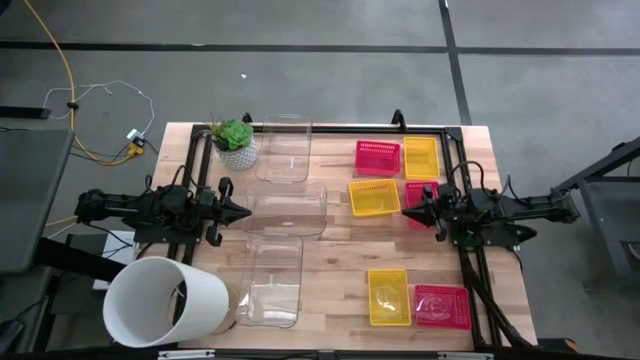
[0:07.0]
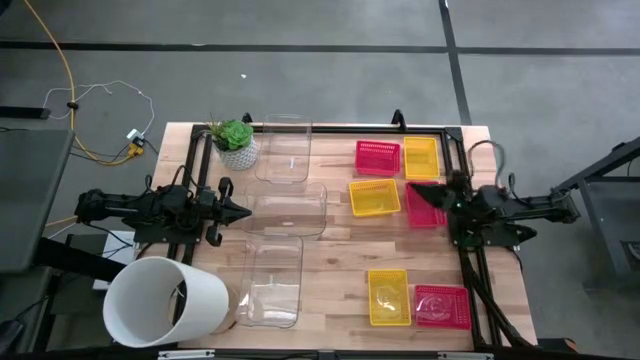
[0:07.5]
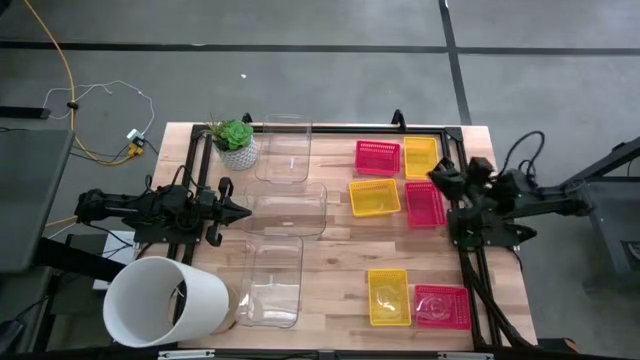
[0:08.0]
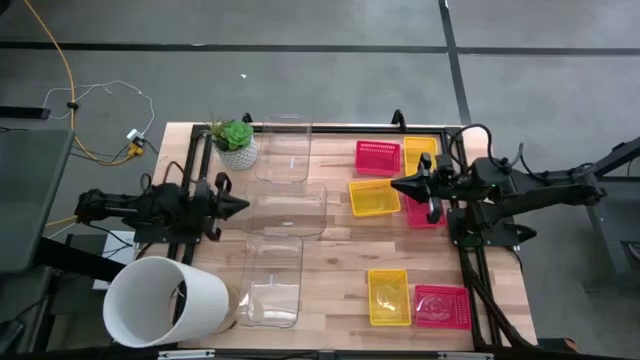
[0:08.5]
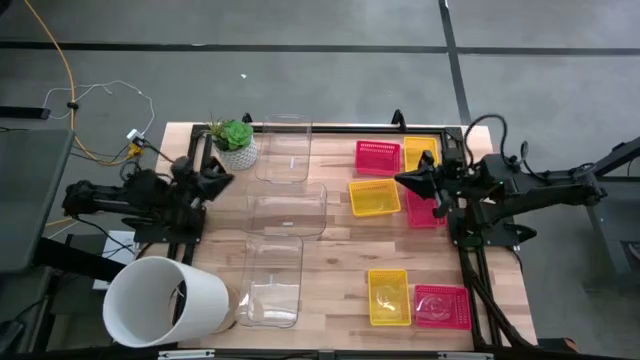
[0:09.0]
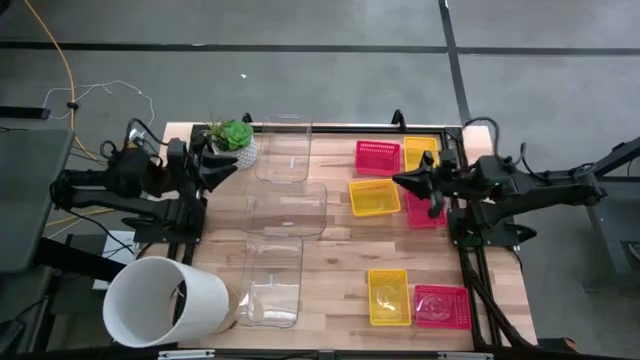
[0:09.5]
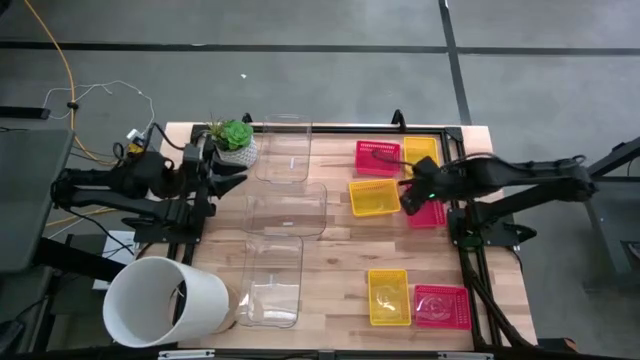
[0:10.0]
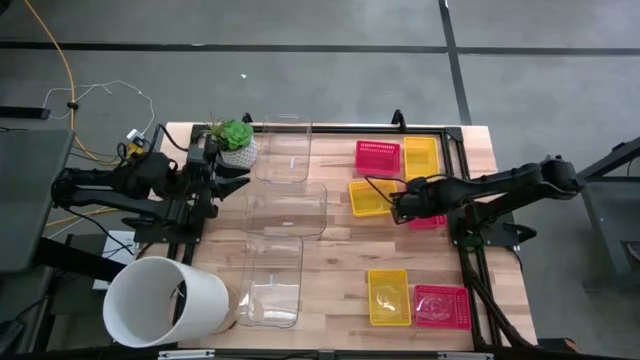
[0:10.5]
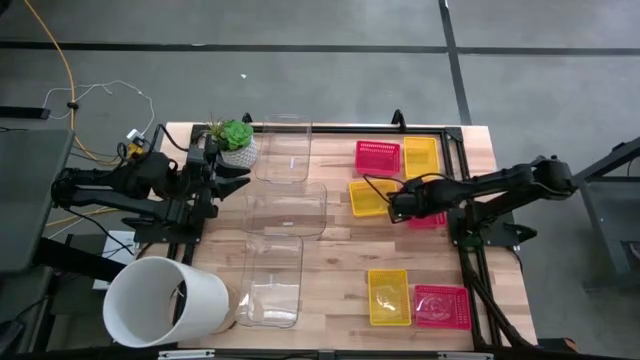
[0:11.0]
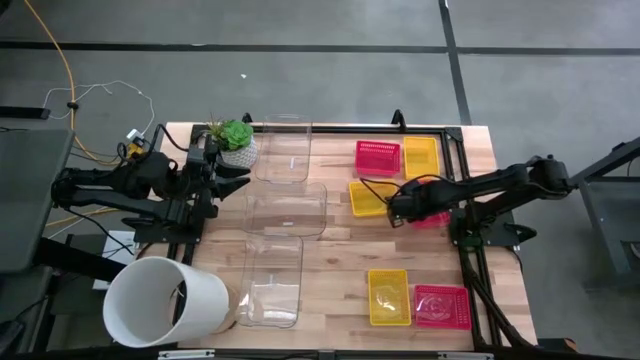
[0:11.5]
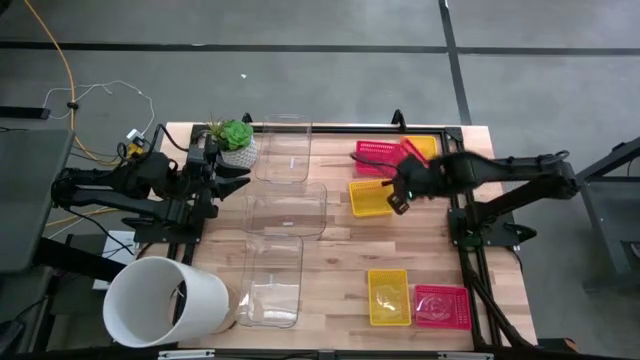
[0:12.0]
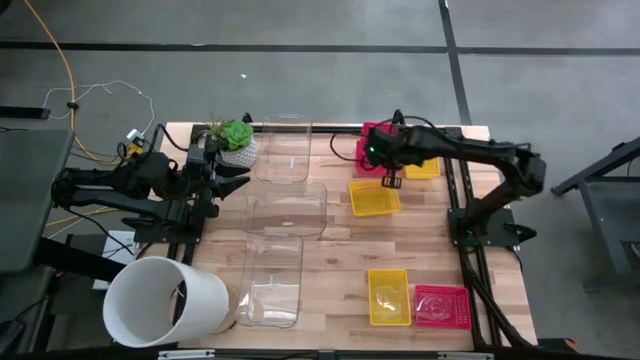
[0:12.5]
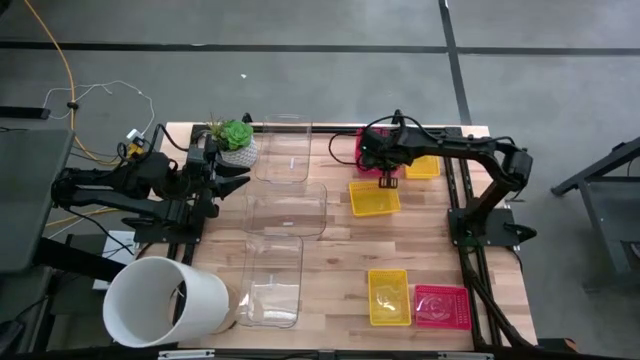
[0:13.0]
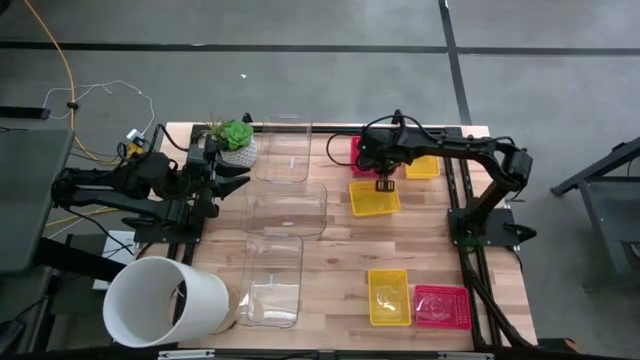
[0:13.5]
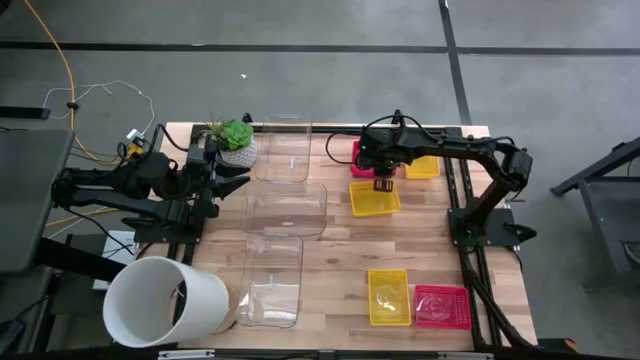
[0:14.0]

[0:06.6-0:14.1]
Stack the middle red bin on top of the top red bin

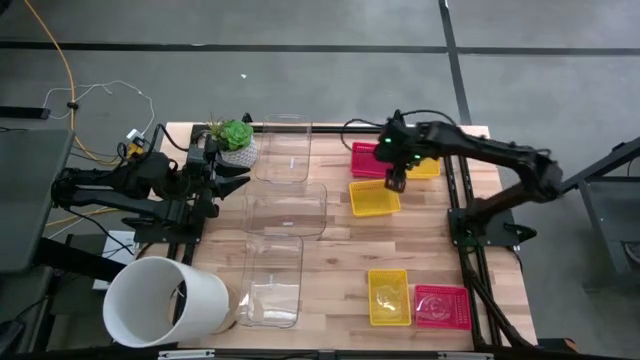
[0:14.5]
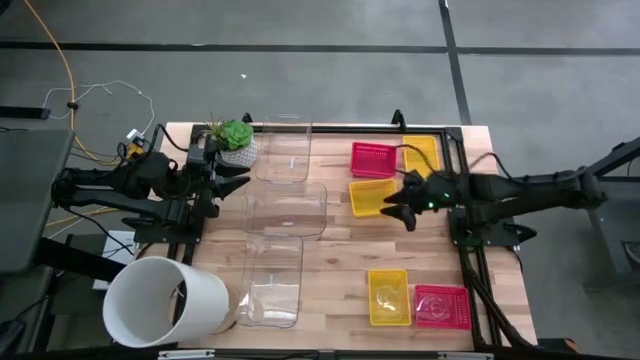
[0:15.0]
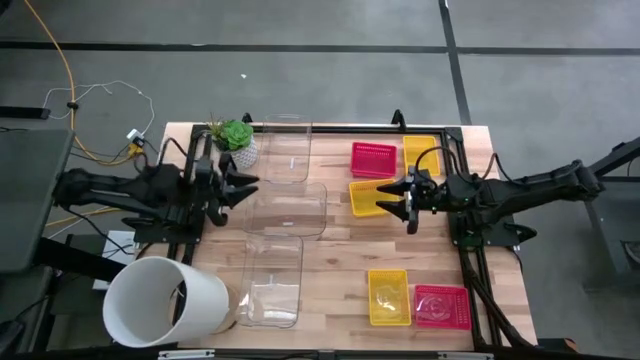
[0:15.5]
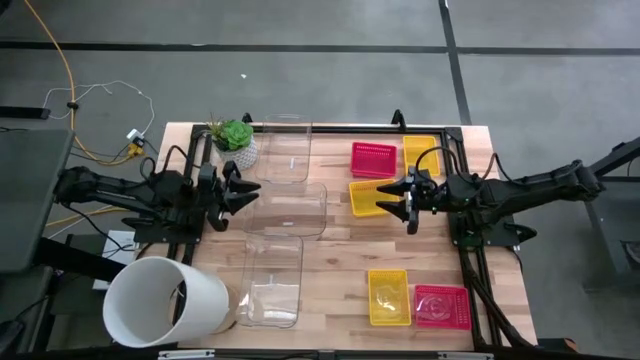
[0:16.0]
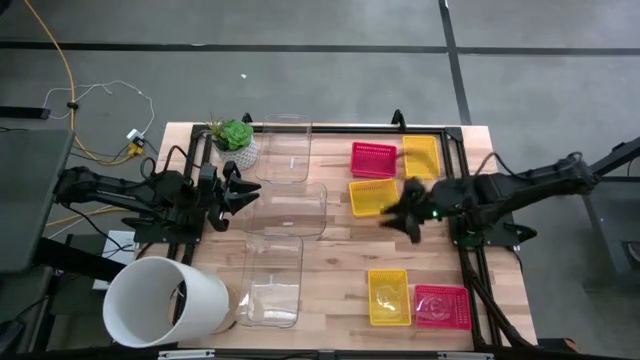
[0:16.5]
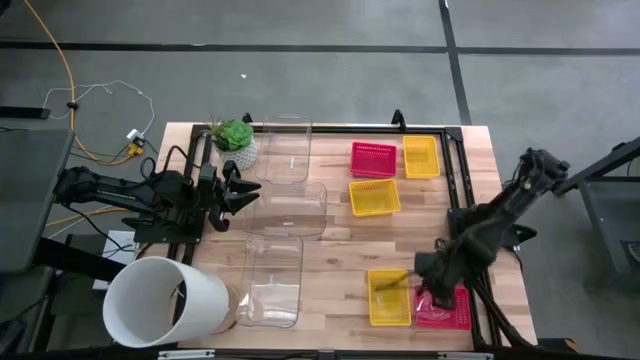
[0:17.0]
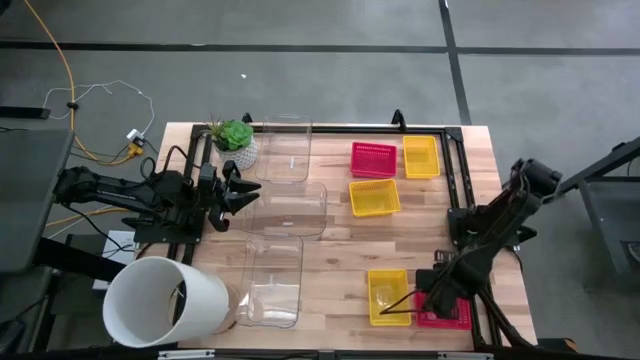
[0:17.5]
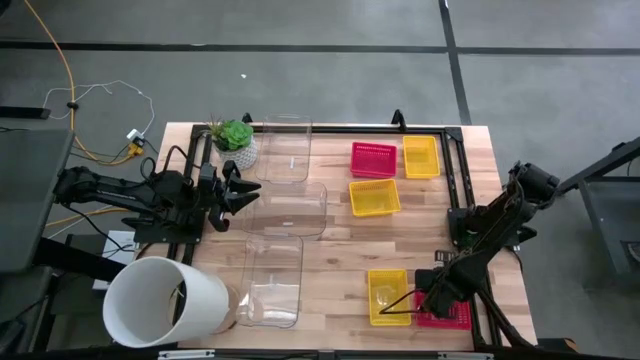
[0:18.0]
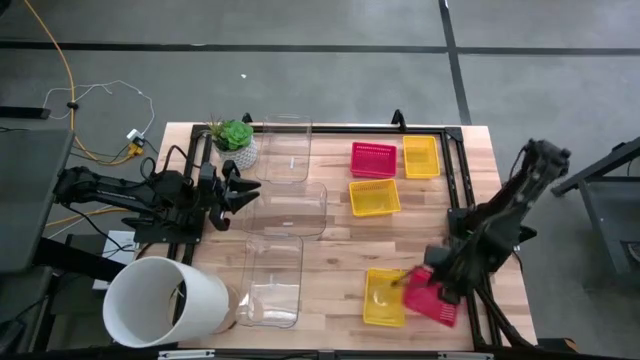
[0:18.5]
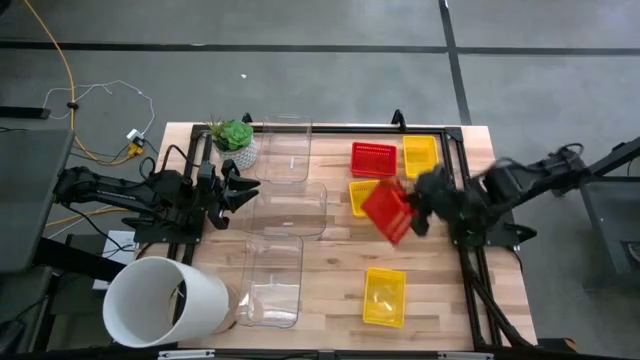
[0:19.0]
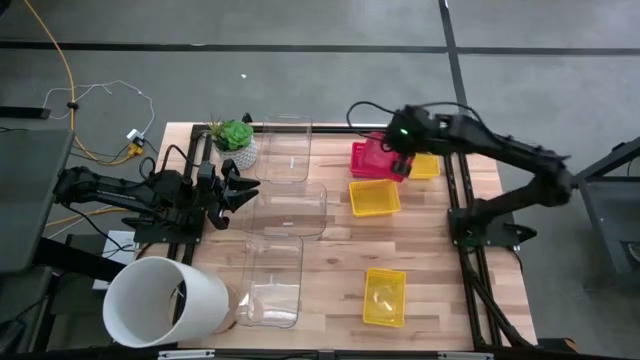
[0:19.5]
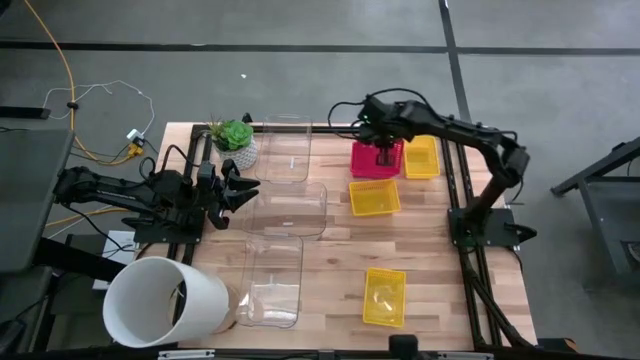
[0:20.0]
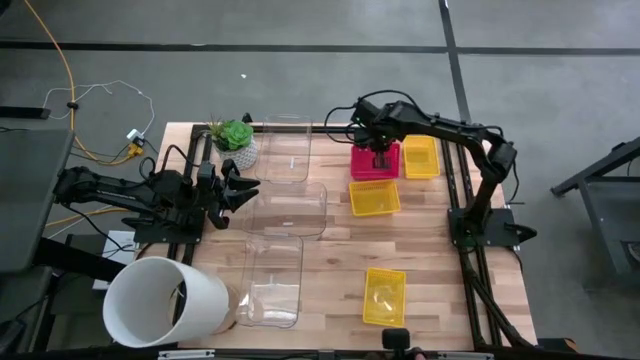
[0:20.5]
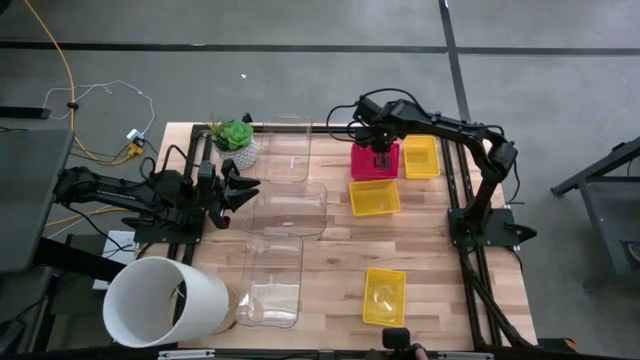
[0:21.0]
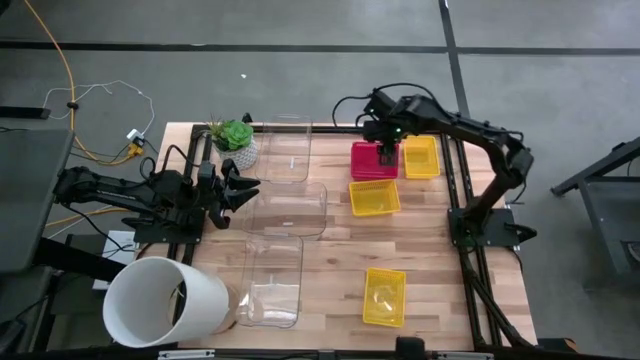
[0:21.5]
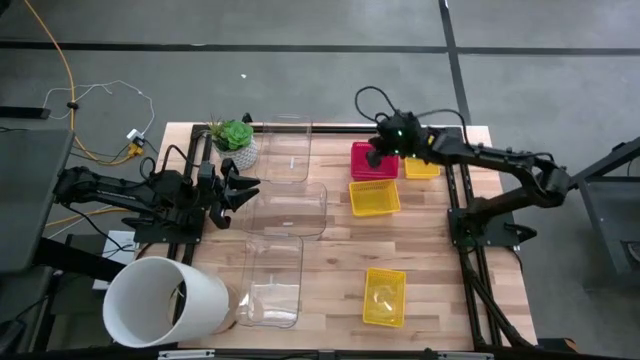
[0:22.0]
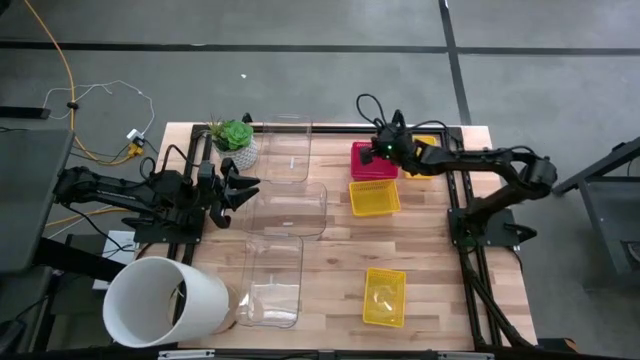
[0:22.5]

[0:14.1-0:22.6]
Stack the bottom red bin on top of the red bin

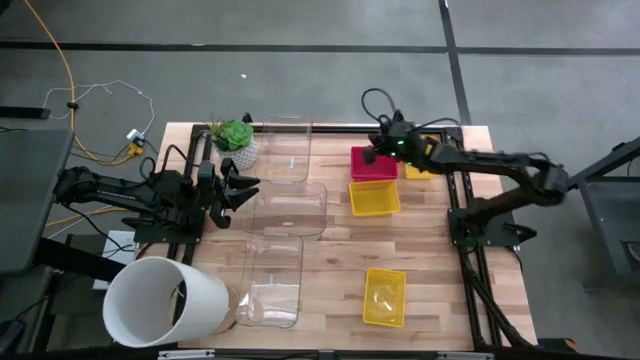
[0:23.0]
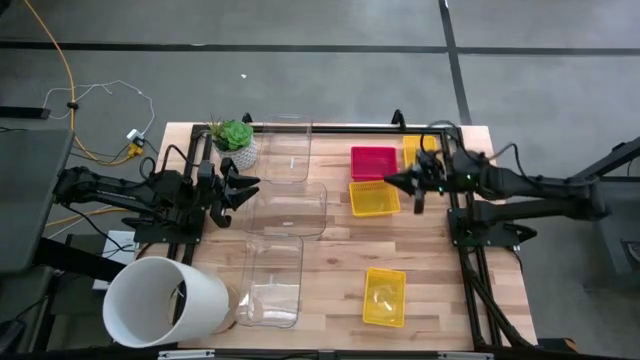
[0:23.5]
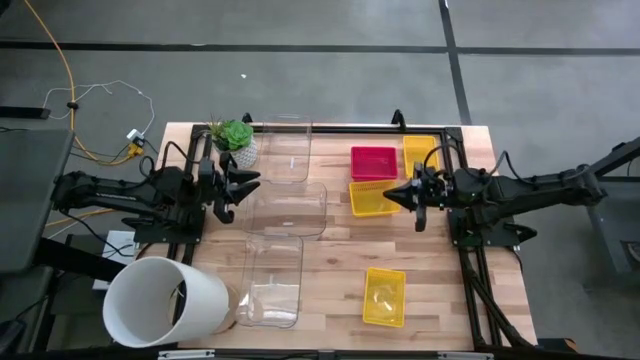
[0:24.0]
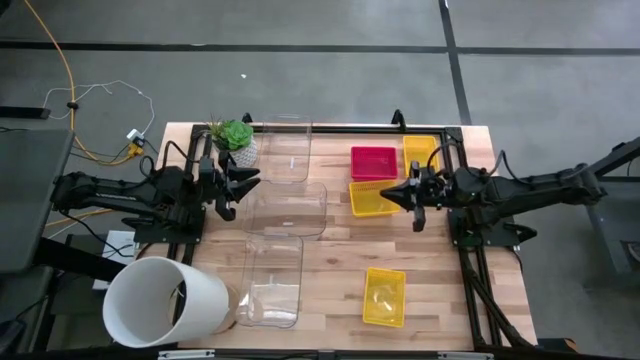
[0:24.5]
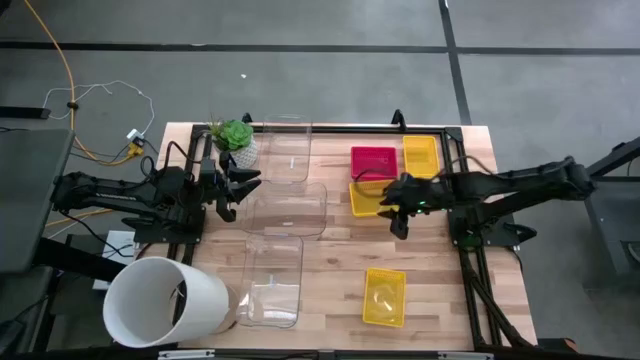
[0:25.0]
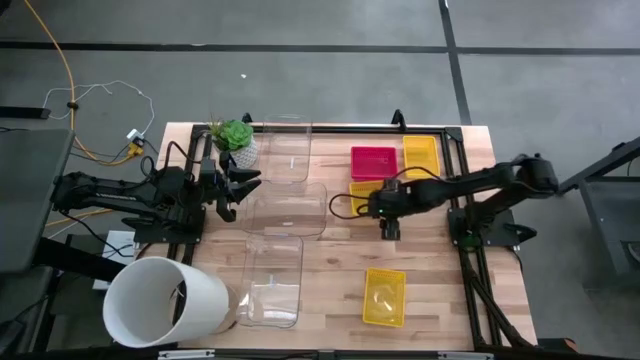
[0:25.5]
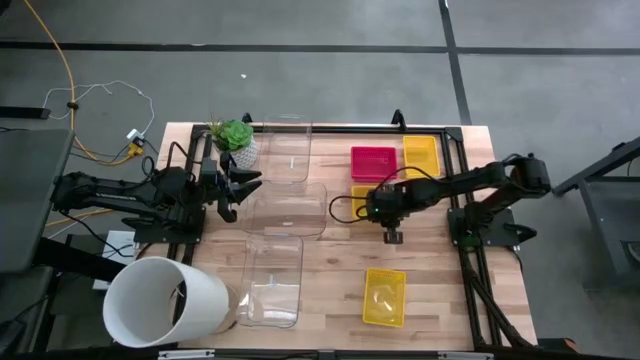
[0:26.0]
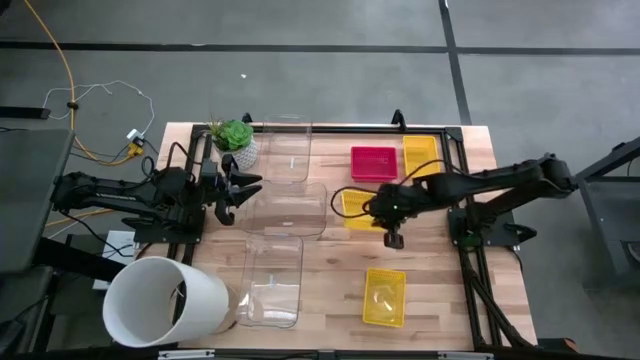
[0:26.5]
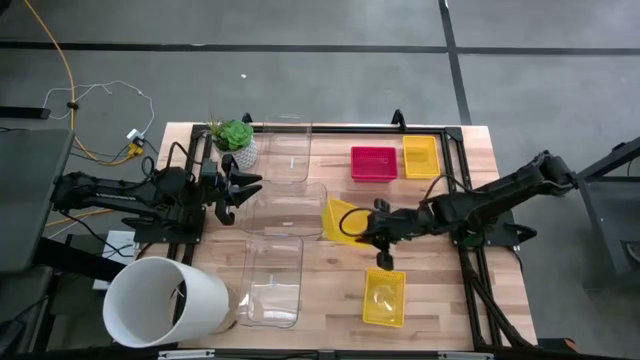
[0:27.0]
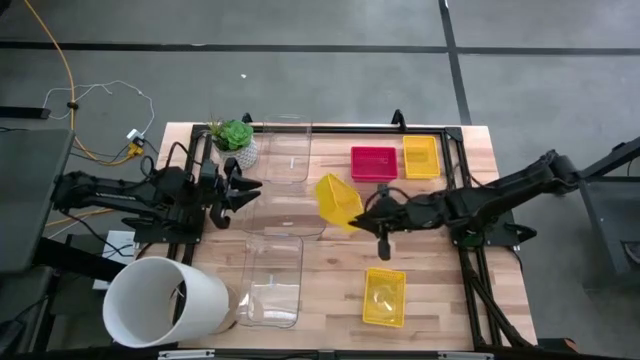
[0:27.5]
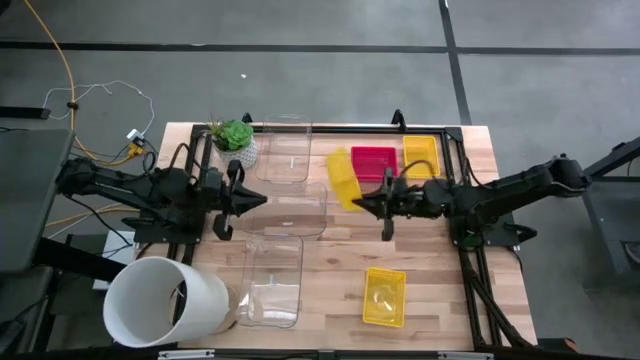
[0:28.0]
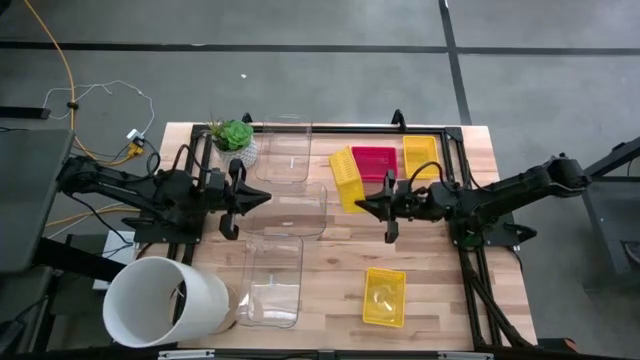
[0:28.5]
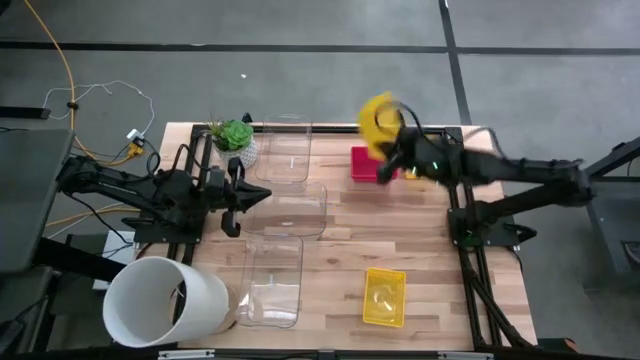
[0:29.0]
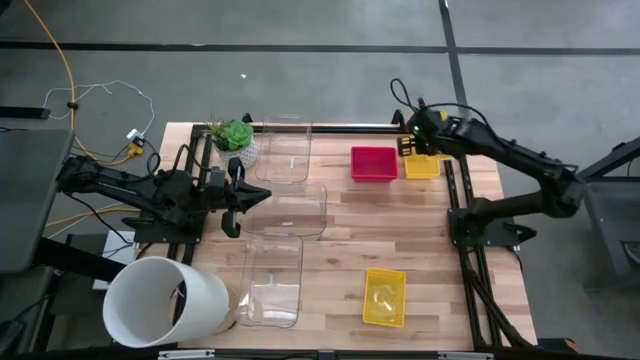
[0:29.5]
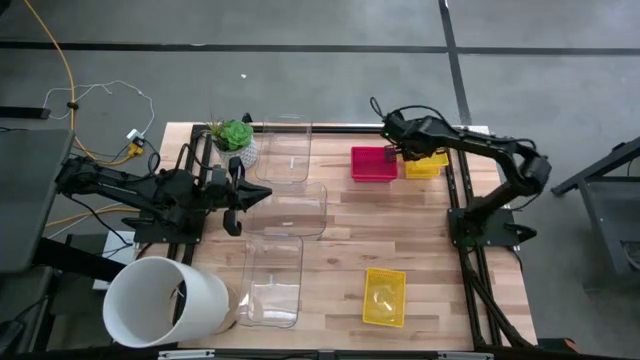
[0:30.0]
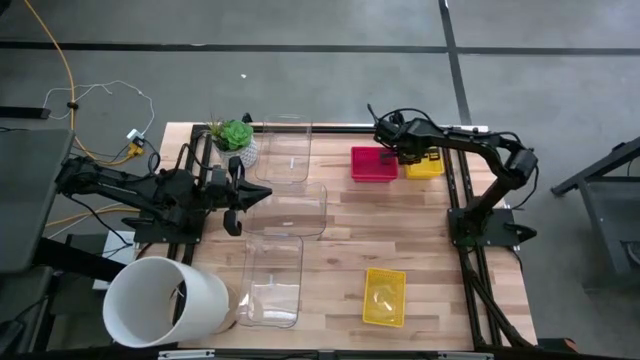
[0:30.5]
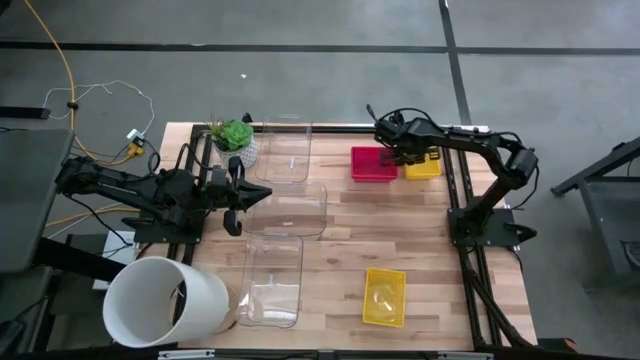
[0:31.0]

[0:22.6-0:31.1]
Stack the middle yellow bin on top of the top yellow bin
